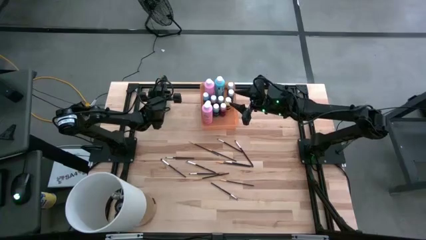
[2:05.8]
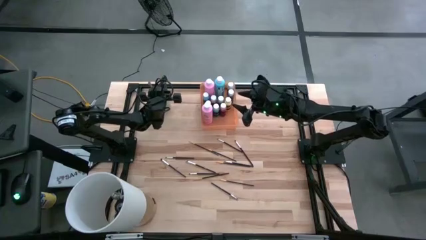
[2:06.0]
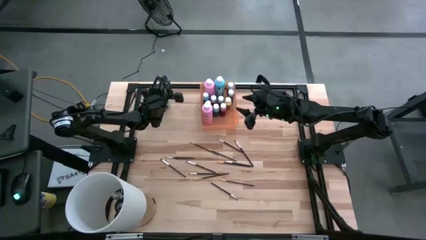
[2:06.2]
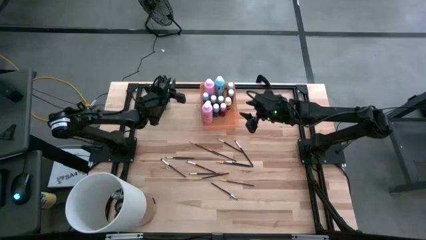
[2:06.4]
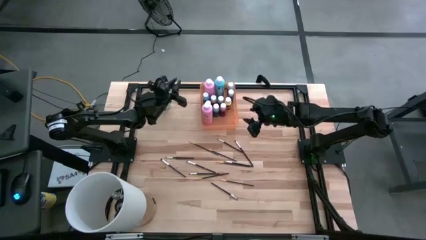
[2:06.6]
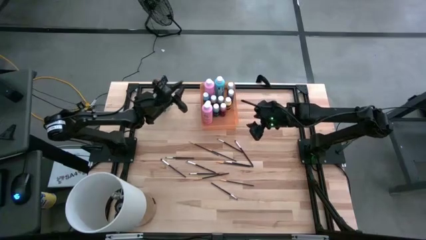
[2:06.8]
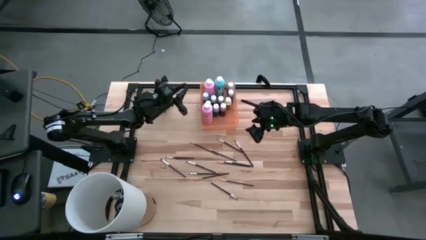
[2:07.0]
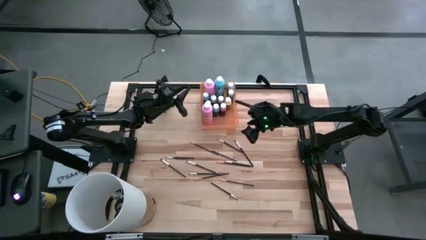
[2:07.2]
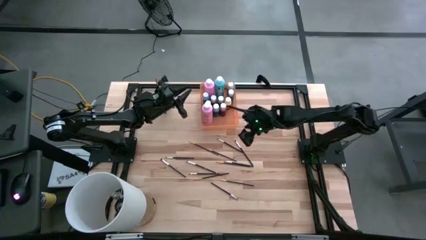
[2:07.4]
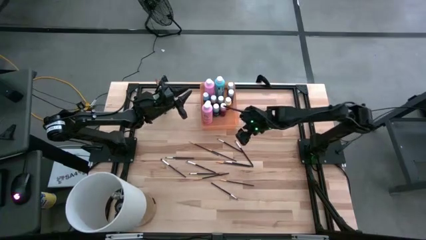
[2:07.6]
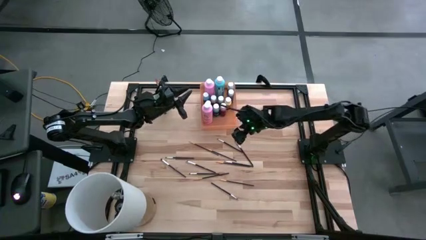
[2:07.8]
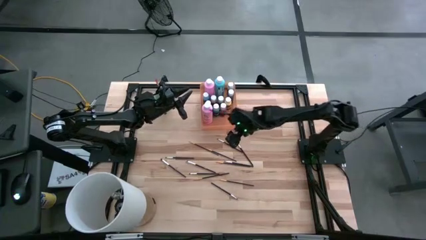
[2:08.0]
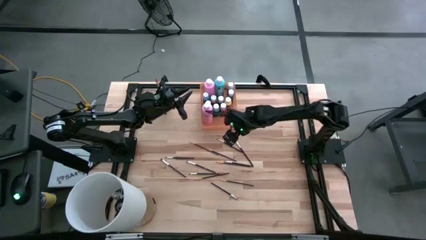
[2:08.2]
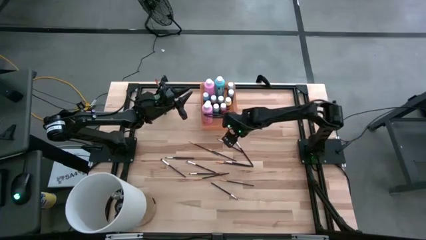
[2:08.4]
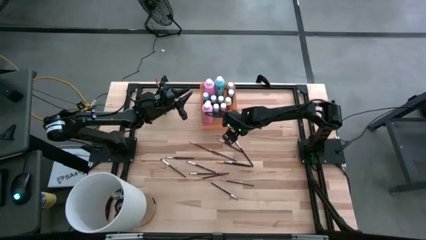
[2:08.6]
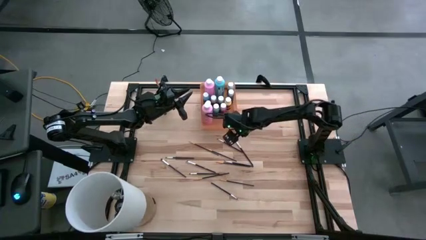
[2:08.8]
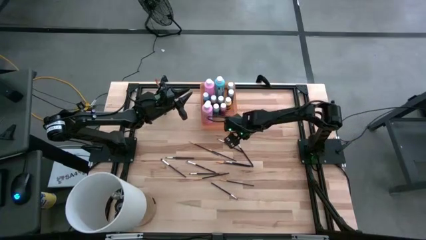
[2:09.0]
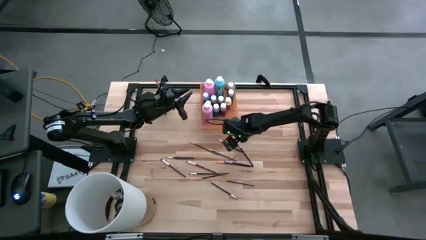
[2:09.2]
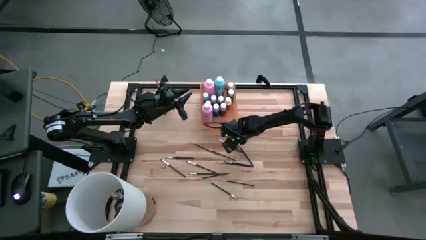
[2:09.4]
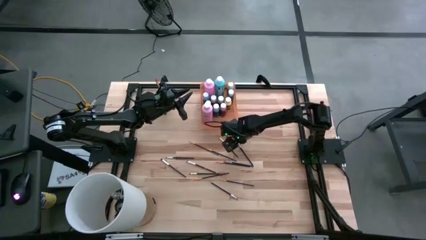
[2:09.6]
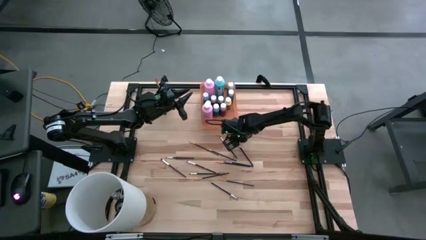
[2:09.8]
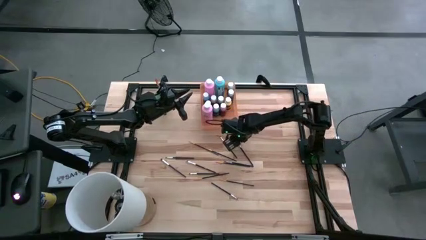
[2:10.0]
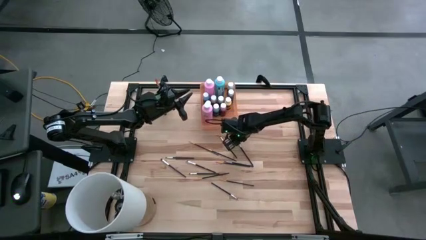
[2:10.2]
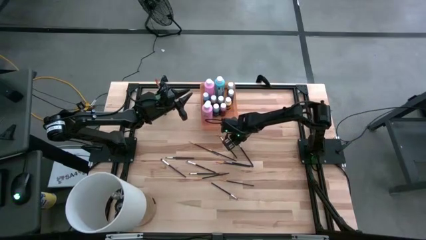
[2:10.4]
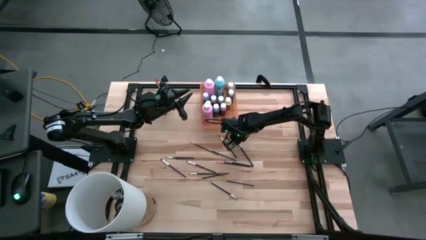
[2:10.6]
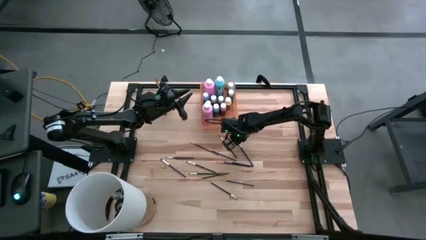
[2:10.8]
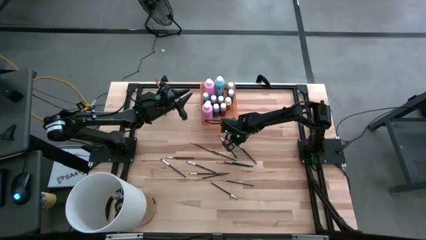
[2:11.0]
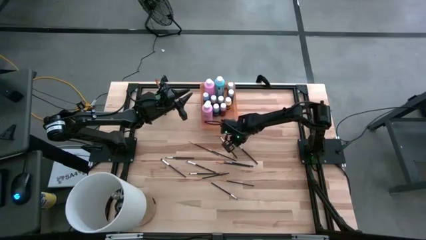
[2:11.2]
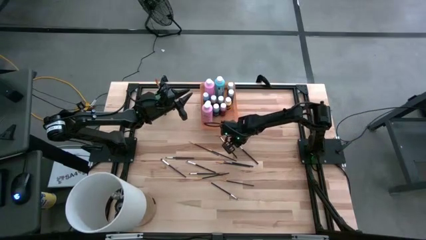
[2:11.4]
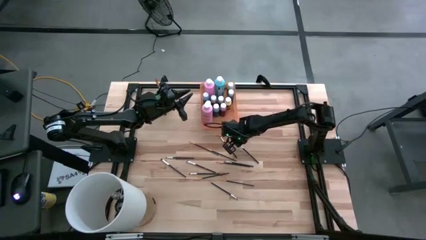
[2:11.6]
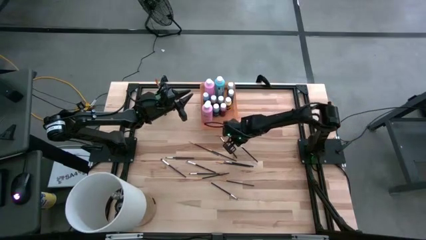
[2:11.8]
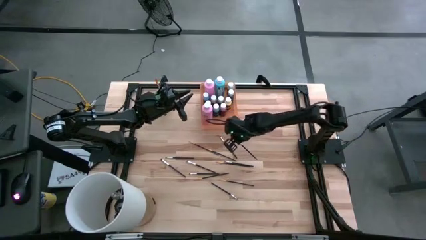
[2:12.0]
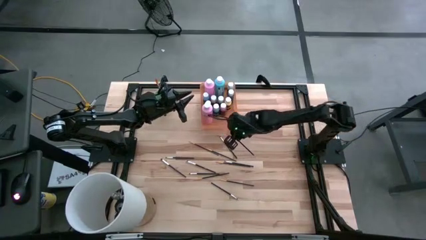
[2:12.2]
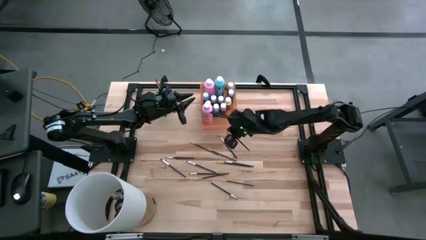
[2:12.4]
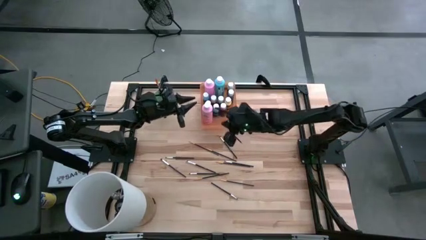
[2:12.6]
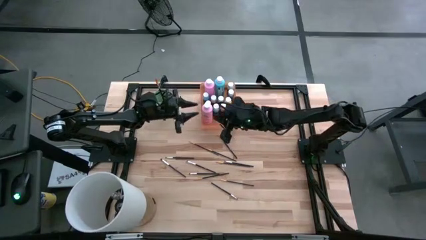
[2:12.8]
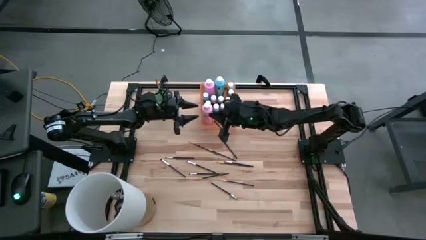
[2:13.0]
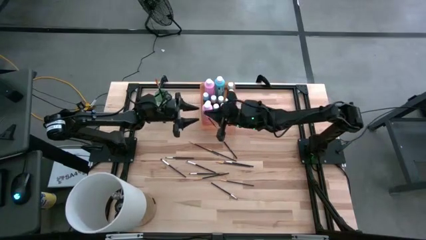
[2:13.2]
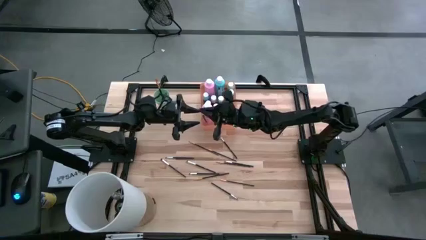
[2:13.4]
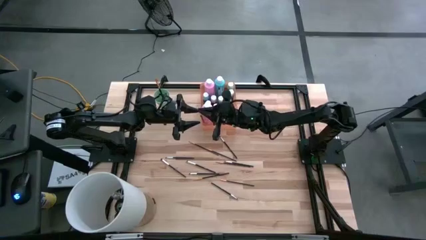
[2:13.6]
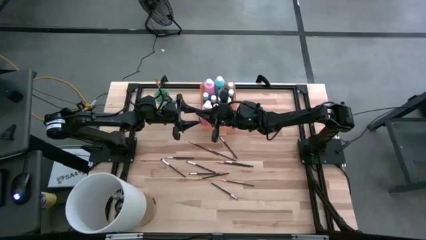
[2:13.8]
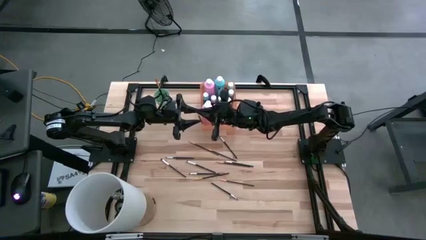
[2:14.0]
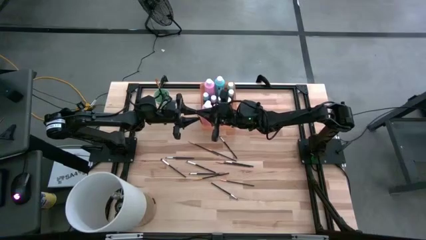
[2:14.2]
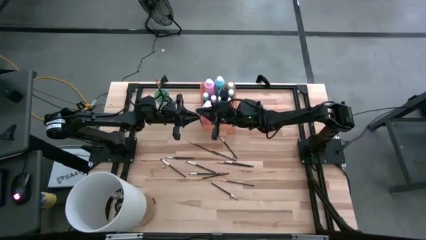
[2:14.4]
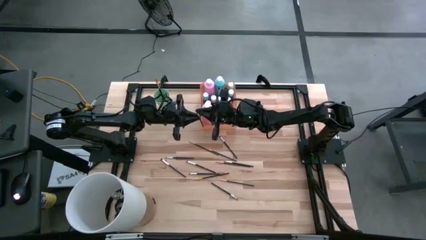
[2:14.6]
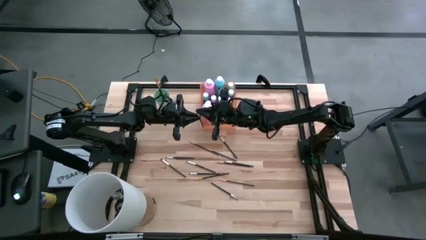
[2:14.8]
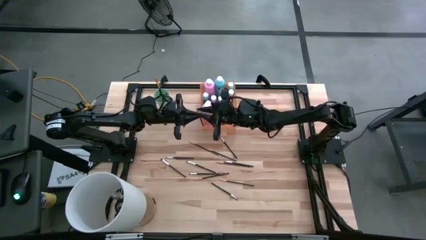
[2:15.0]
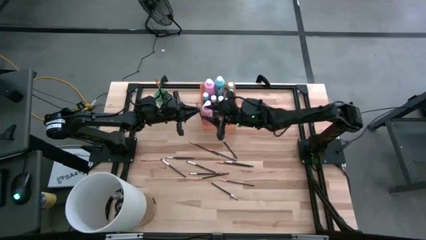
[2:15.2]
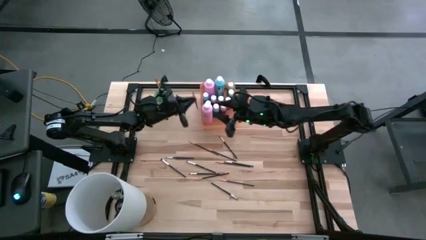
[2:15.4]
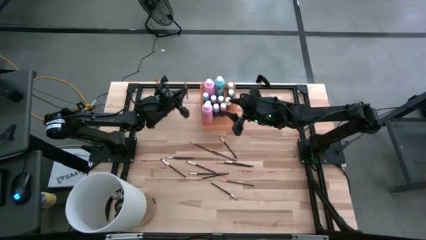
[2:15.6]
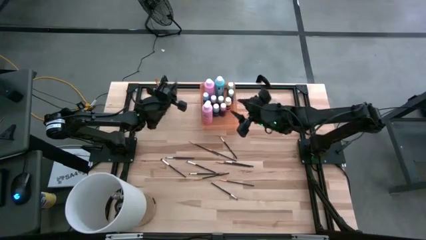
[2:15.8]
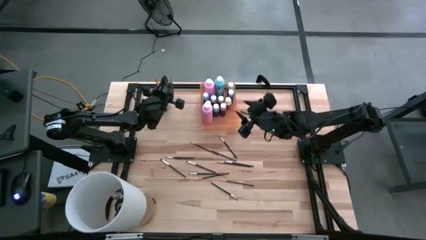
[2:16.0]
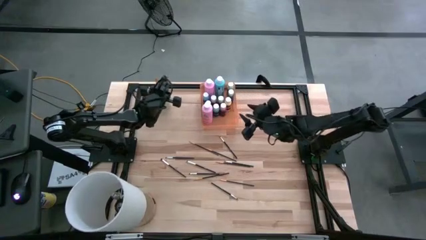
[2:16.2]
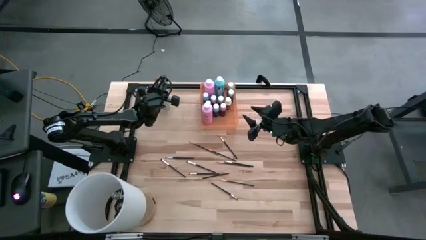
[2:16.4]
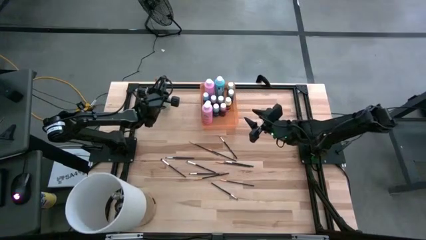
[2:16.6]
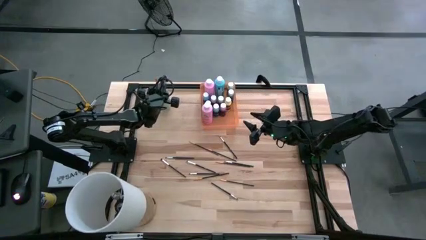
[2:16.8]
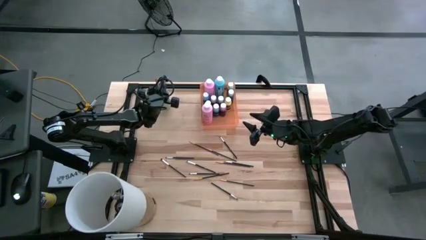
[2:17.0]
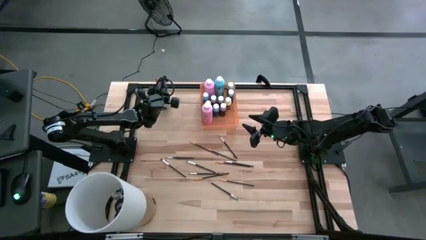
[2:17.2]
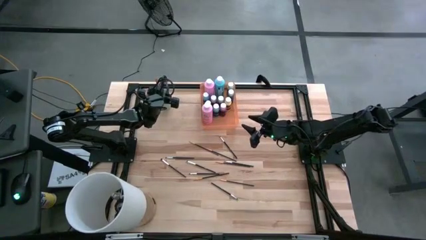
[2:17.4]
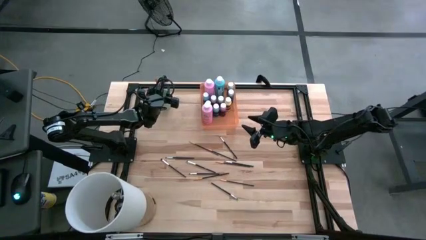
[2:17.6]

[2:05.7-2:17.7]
Task: Pick & Place Paint Supplies
Put the white paintbrush into the cup
